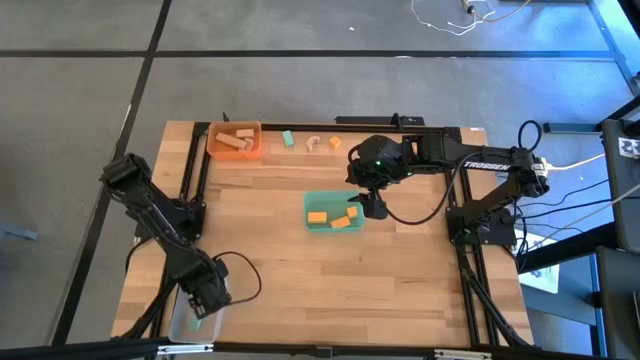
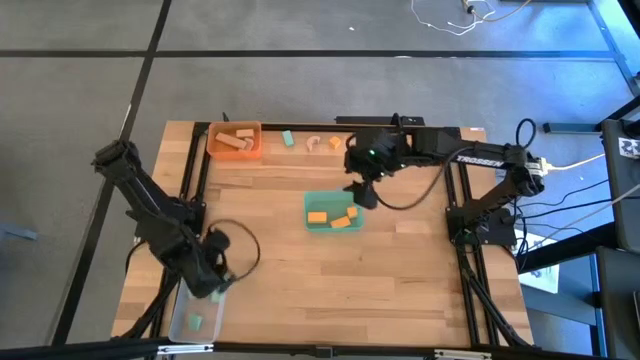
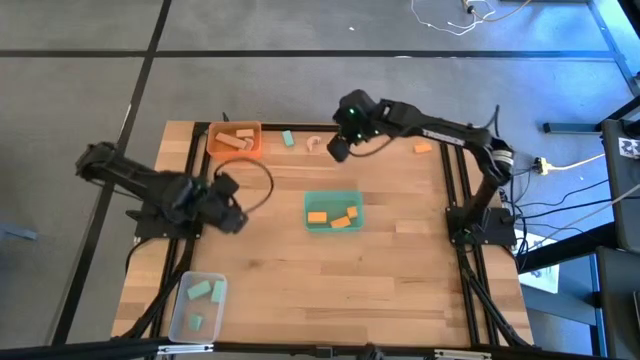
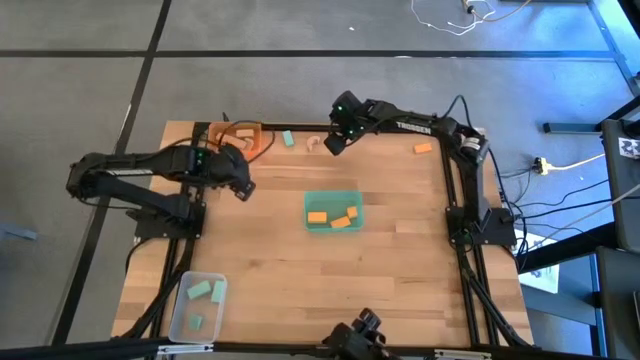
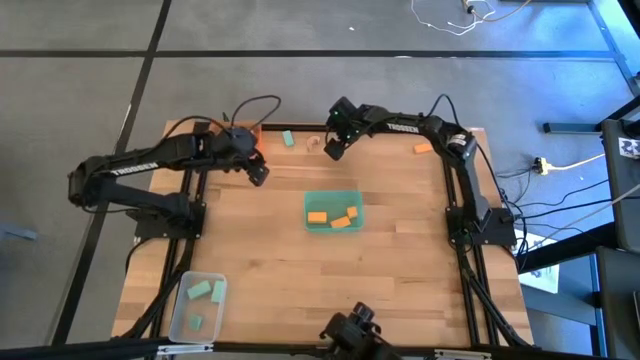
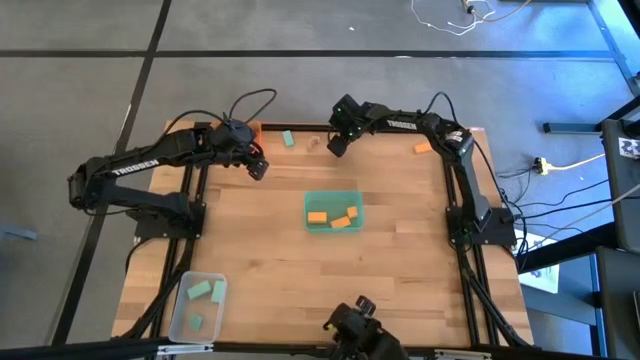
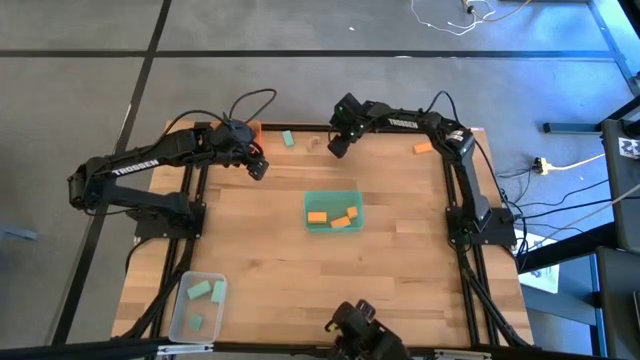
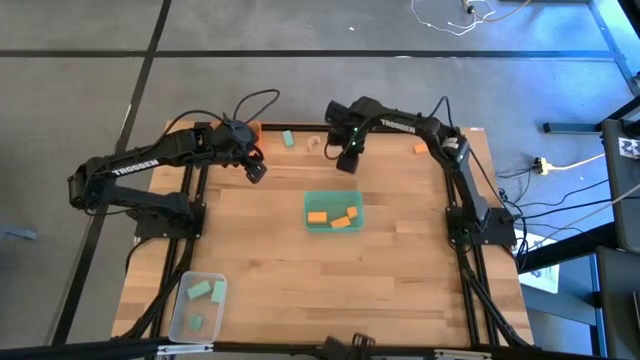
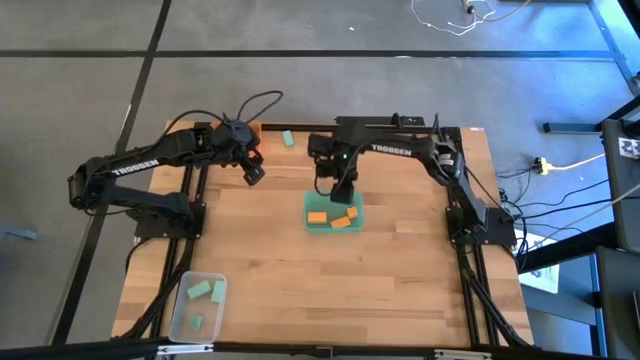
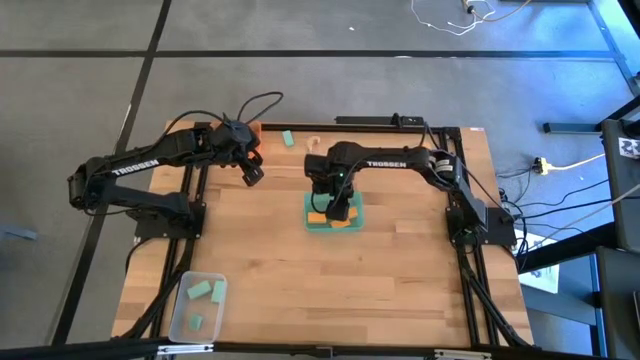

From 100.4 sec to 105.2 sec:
Task: Sort & place blocks by color
Put the orange block into the light blue bin

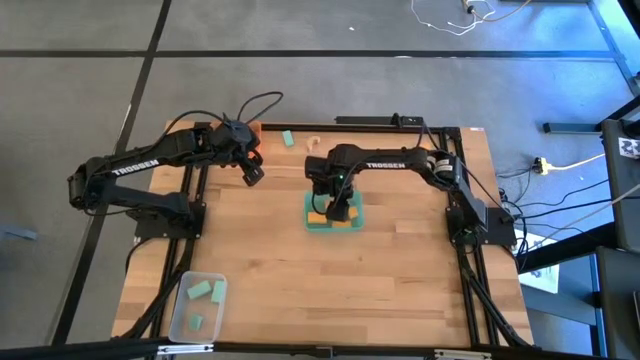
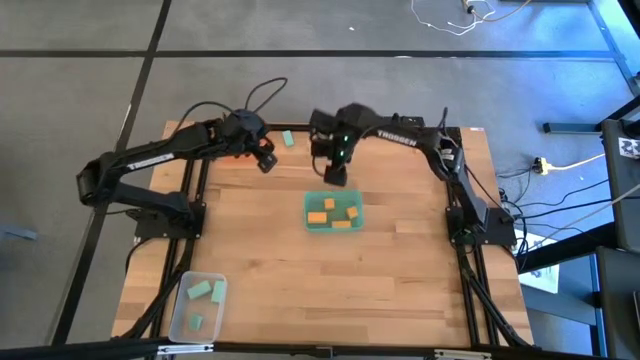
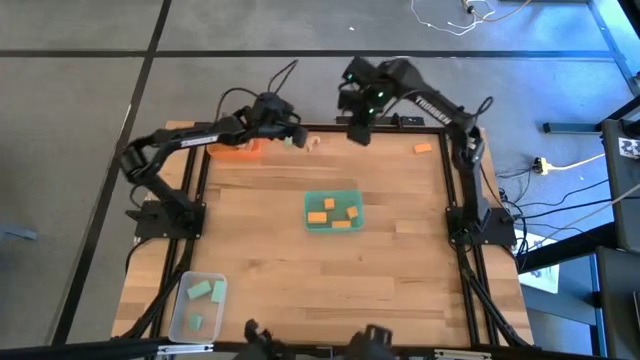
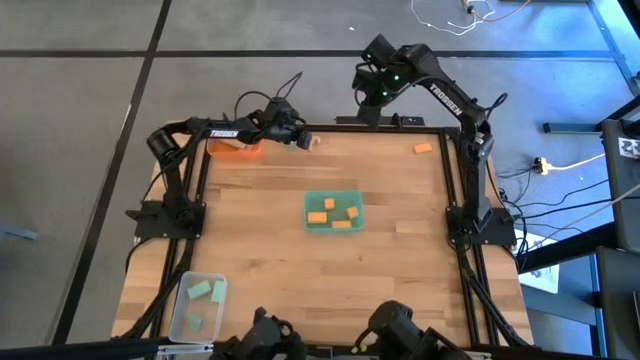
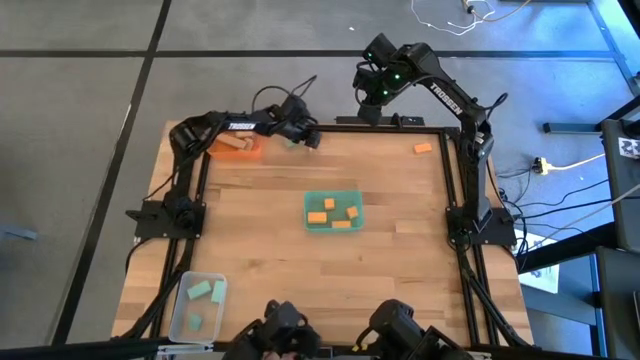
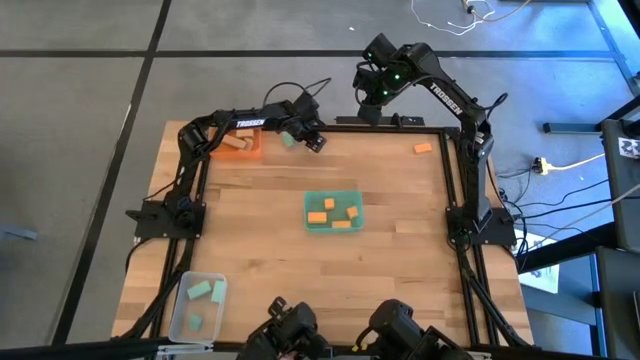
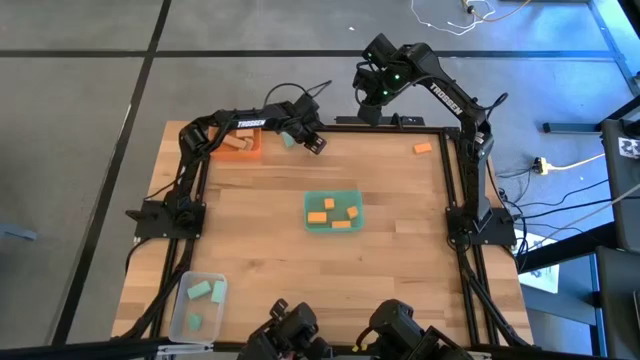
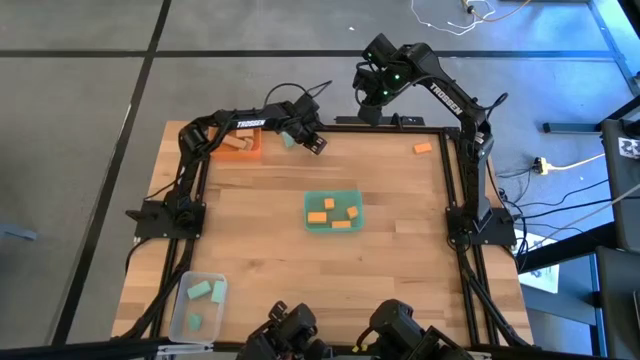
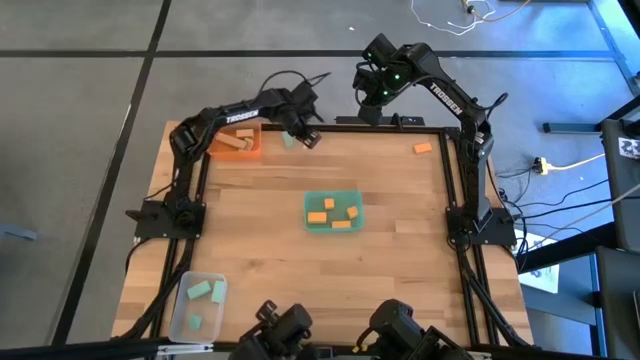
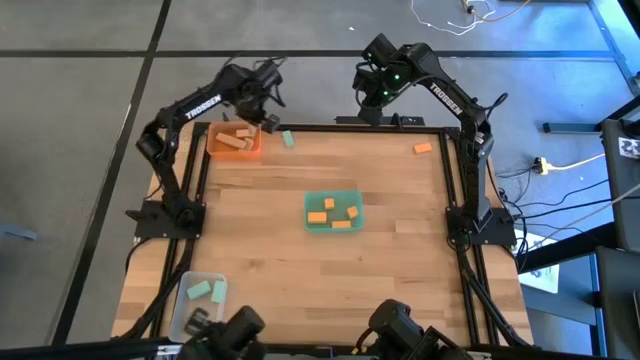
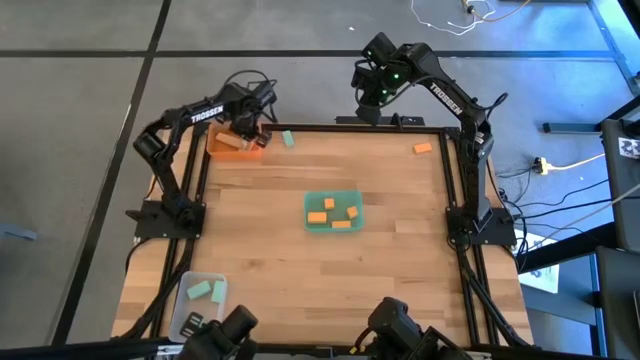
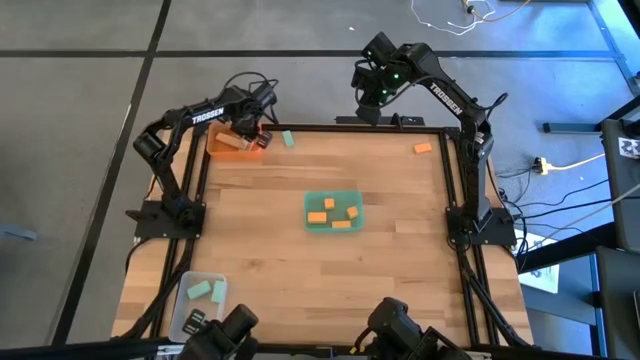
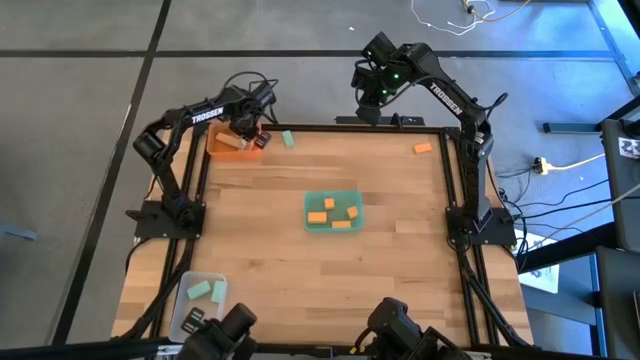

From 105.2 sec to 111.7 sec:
Put the brown block into the light orange bin

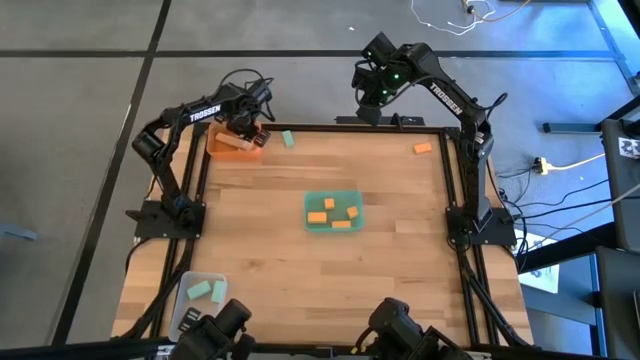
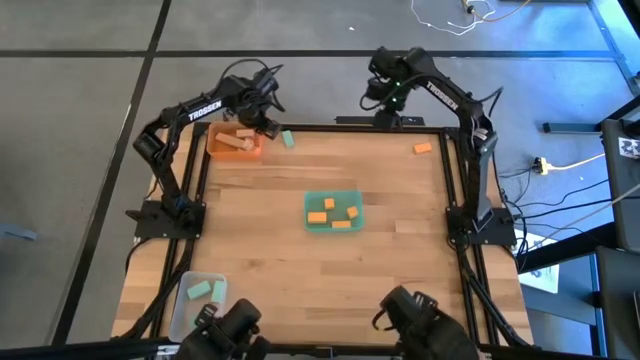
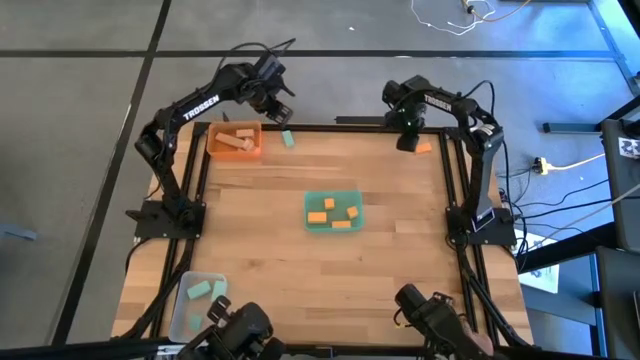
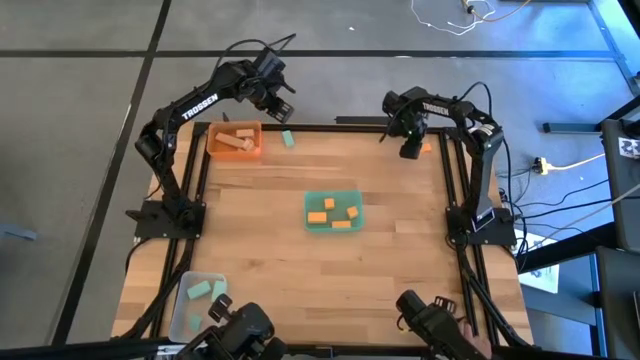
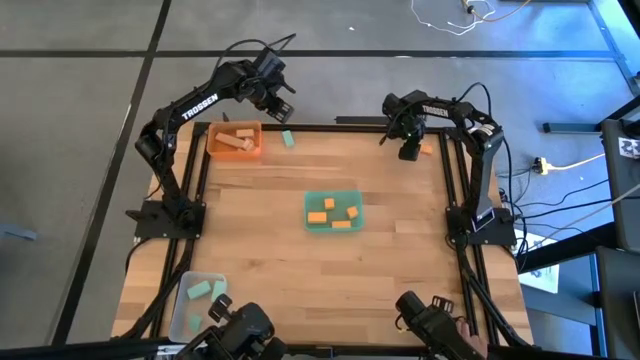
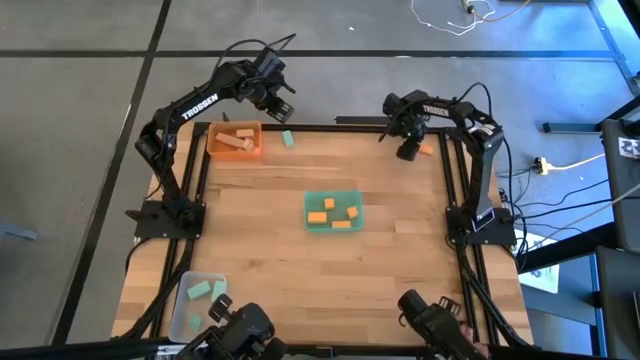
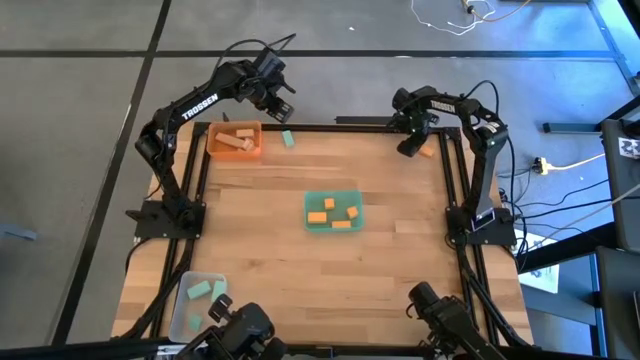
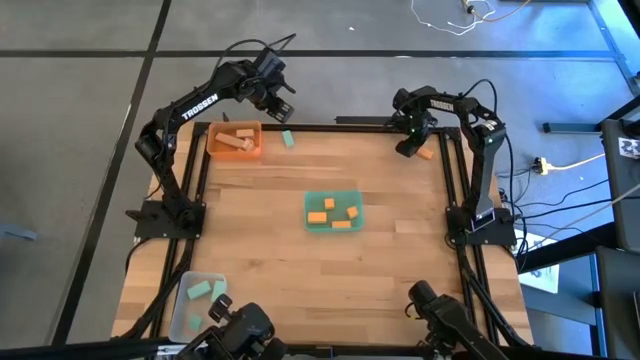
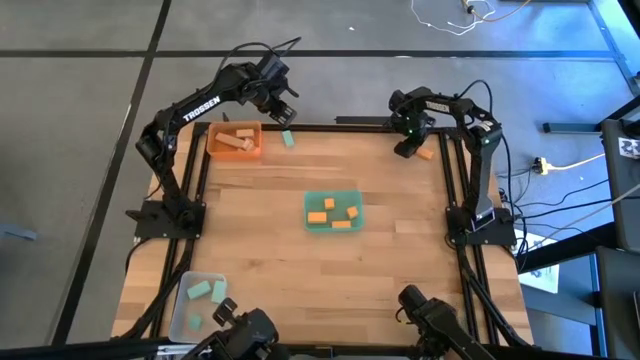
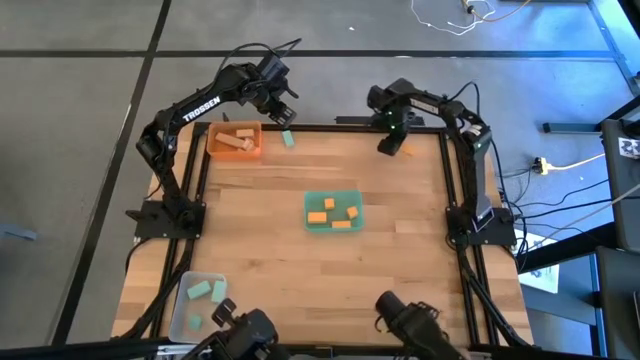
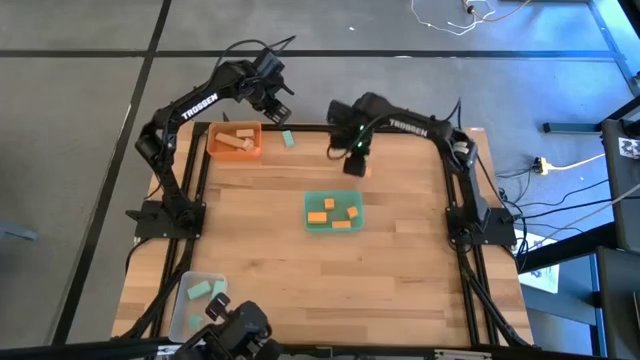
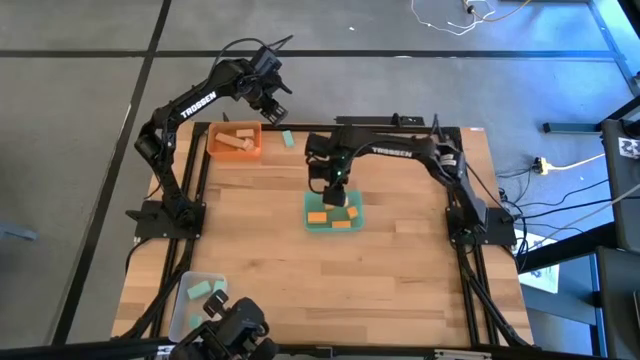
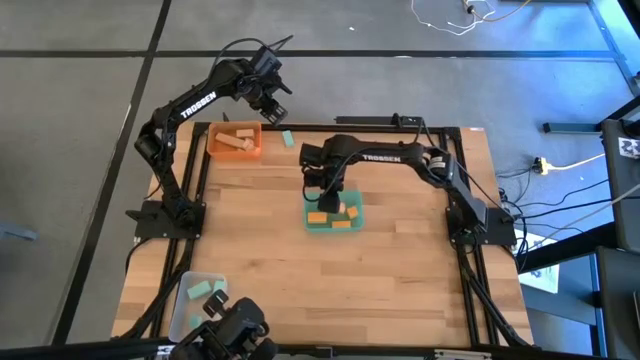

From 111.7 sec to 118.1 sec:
Put the orange block into the light blue bin

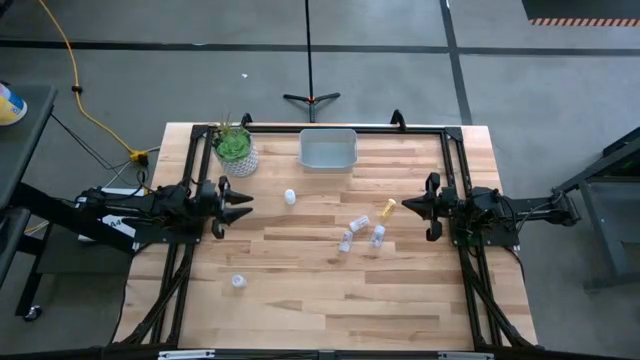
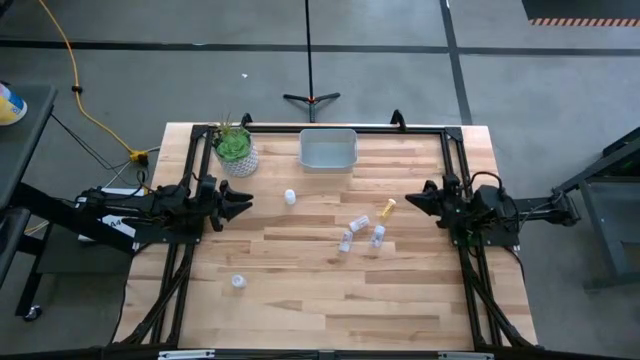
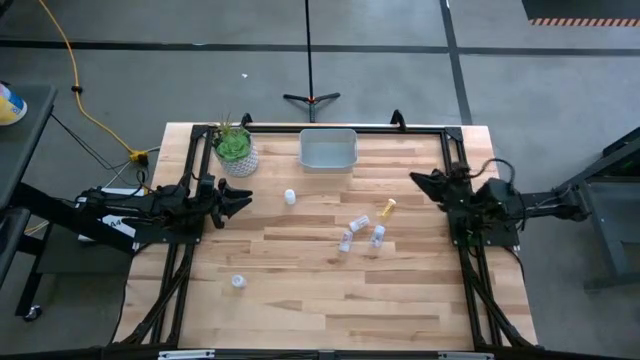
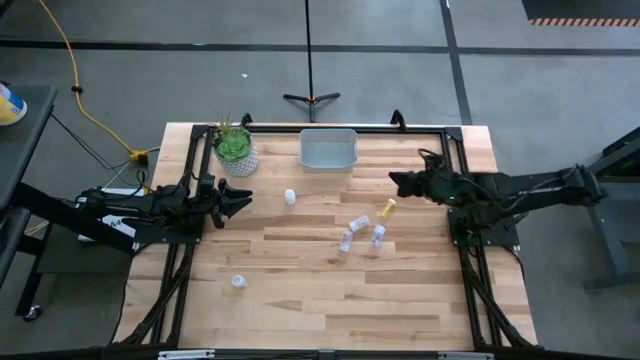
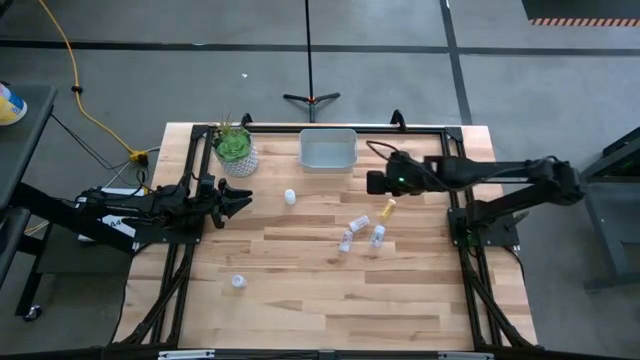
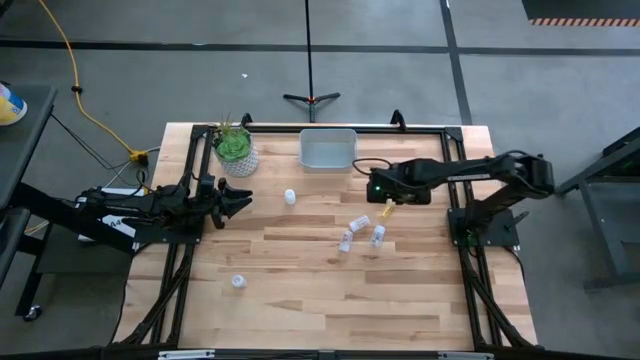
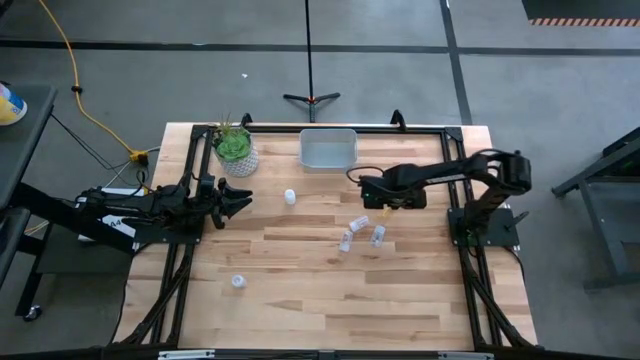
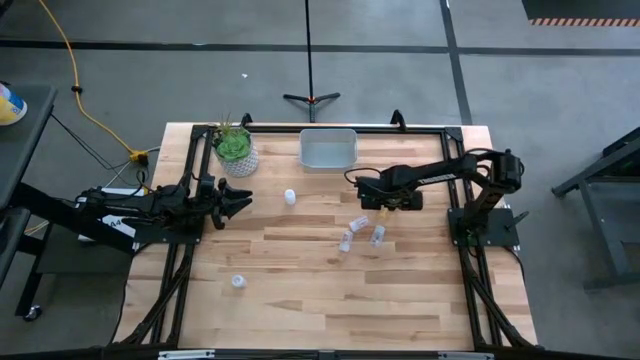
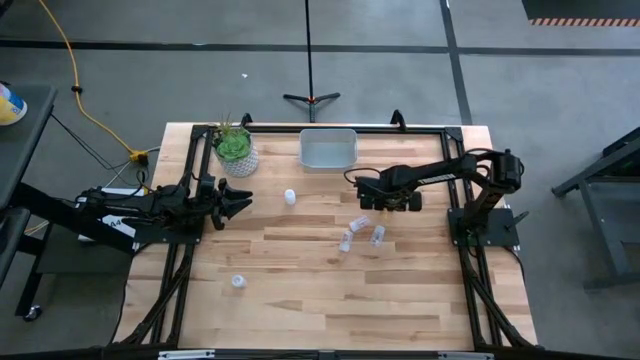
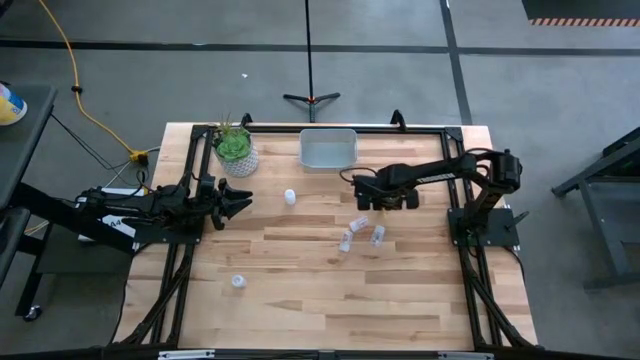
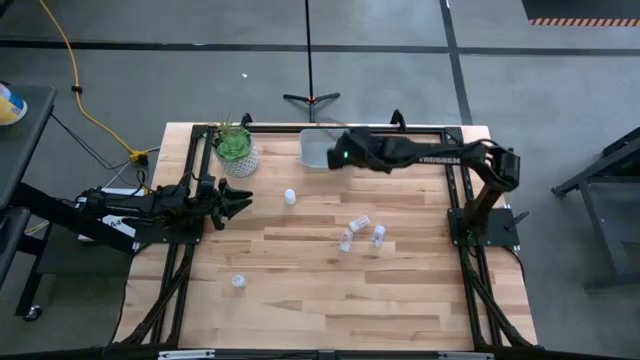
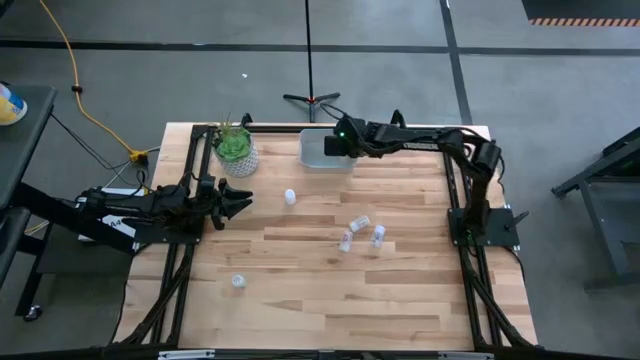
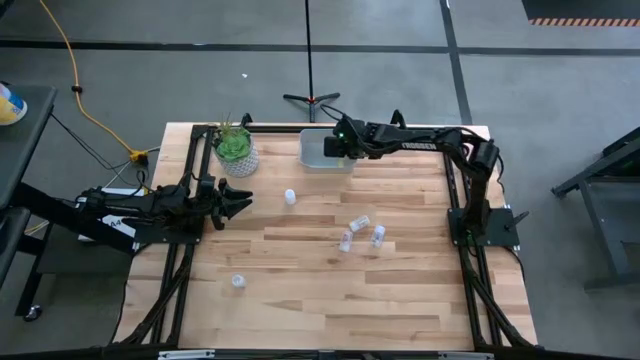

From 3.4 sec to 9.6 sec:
Task: Pick and place pill bottles into a basket
Put the yellow pill bottle into the gray bin
